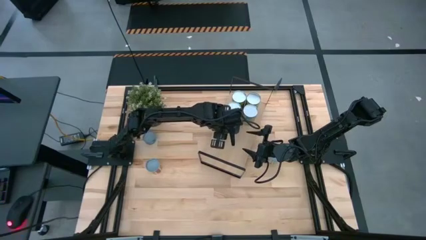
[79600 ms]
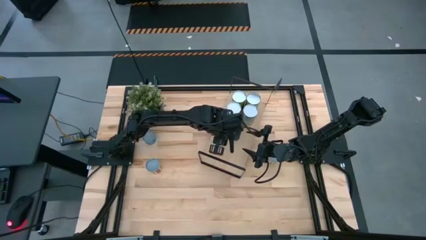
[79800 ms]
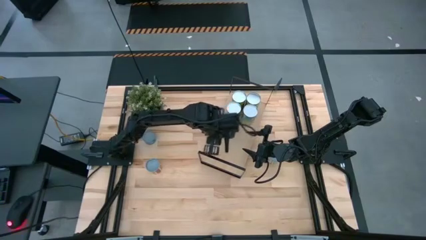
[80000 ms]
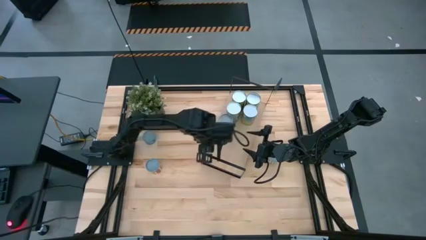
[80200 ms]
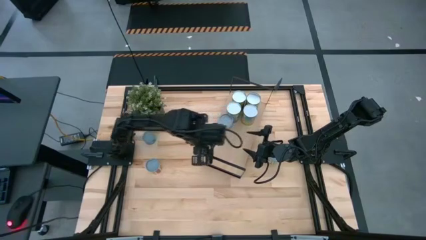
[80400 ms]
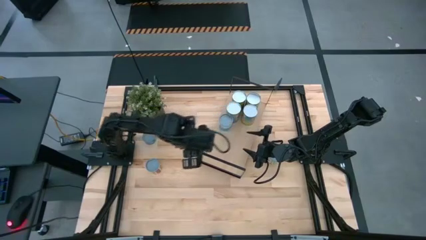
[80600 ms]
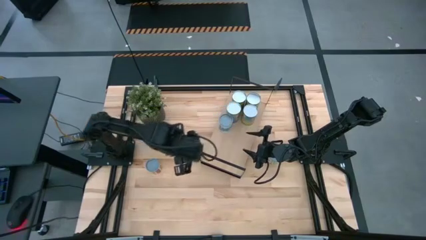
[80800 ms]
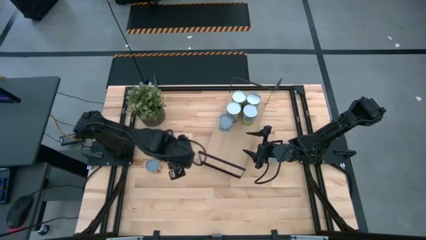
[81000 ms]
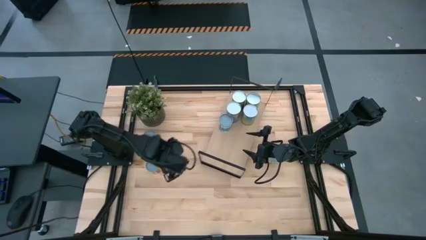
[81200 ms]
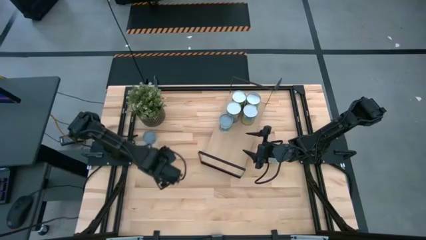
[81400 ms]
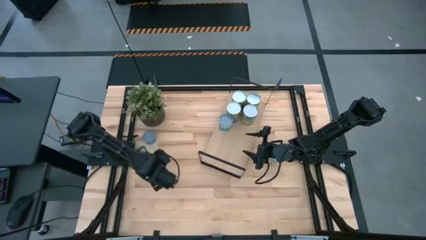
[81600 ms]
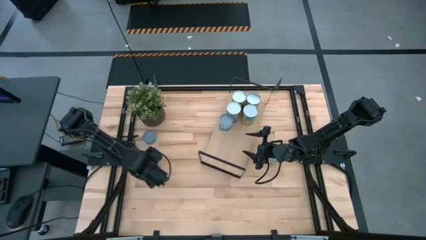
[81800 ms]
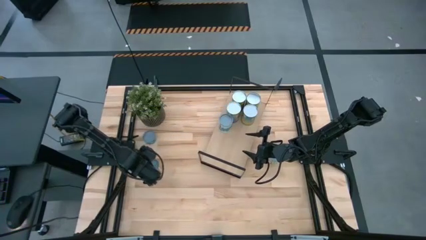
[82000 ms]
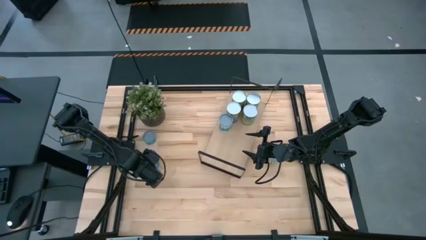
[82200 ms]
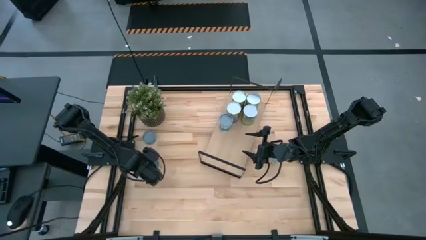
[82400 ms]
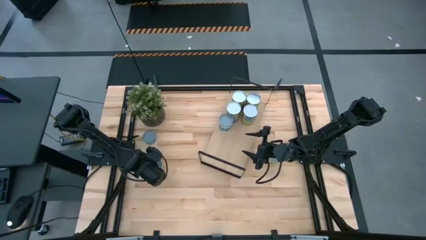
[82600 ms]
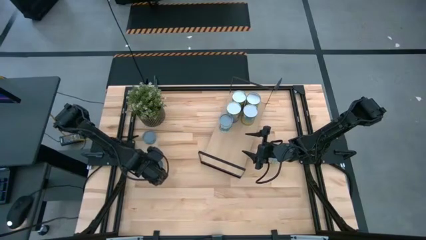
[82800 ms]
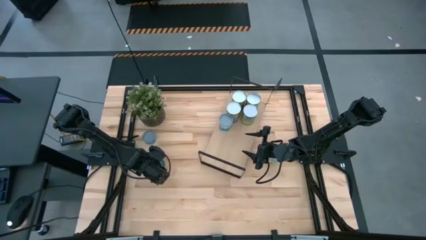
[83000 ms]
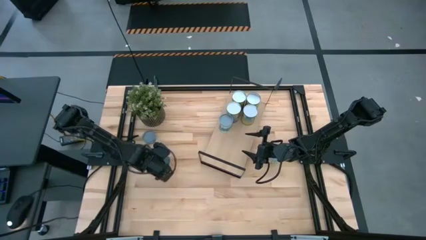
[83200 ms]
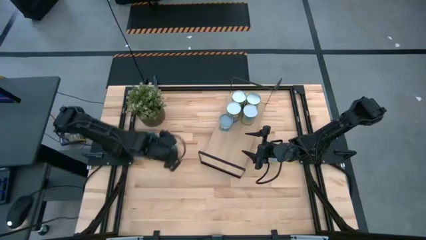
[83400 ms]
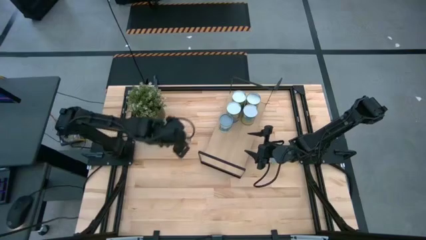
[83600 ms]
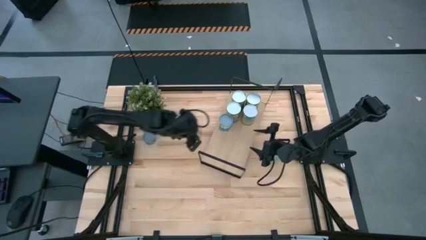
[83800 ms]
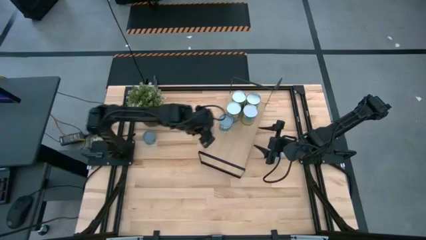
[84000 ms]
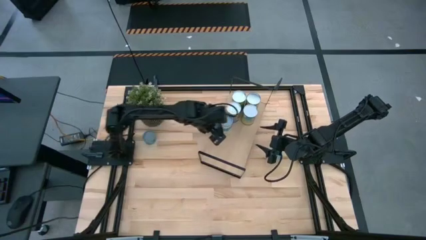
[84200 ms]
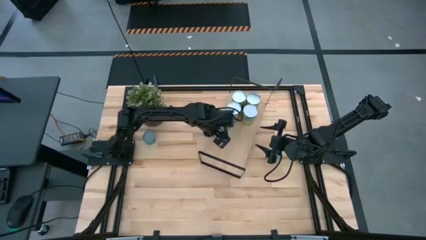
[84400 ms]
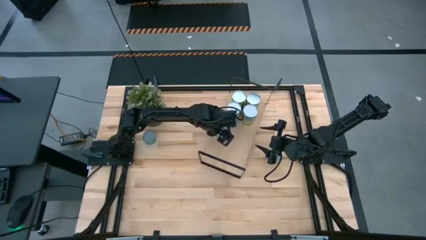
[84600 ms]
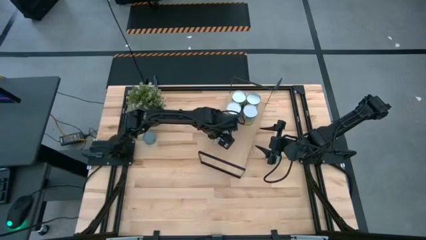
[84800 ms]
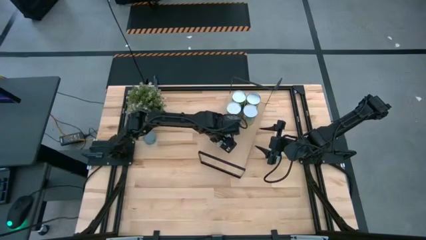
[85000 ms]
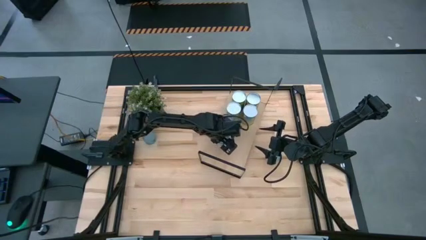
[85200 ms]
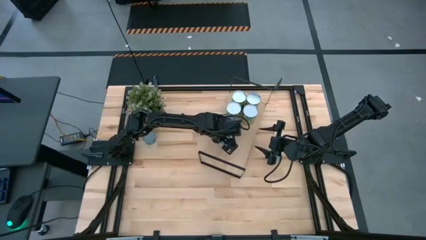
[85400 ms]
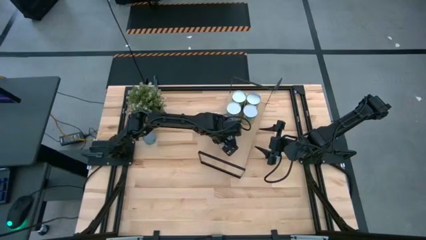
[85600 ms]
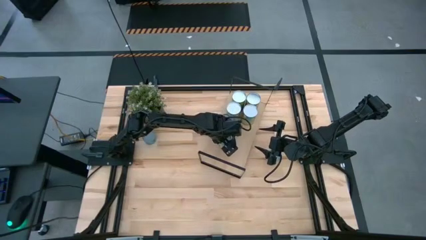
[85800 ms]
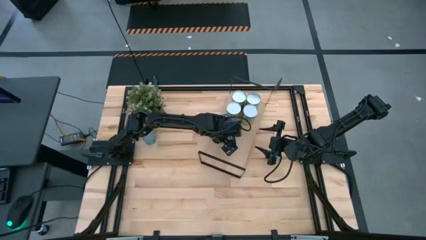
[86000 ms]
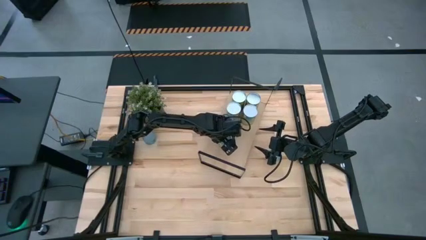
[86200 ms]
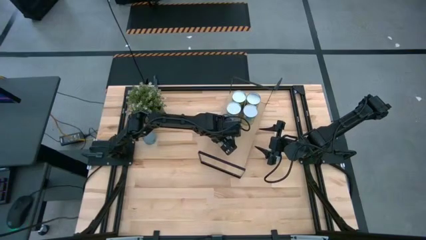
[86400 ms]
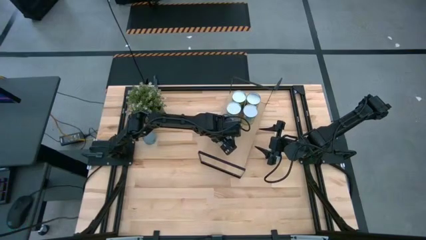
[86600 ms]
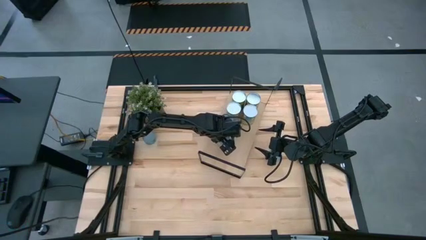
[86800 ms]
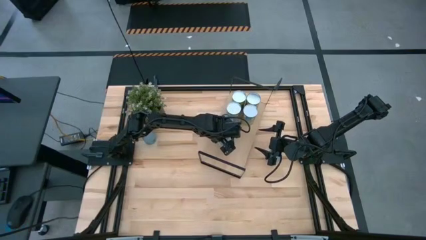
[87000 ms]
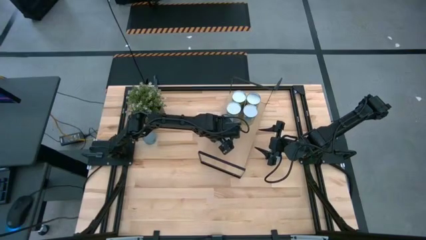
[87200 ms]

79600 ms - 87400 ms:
Task: Pick and place cans onto a shelf
Put the canned sliced tomatoes on the shelf

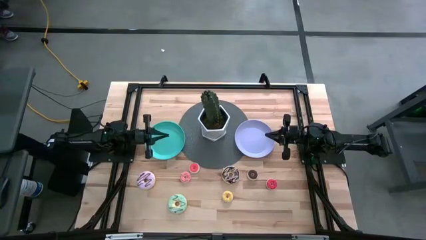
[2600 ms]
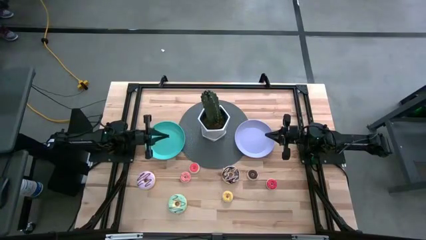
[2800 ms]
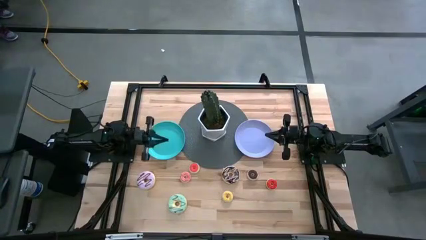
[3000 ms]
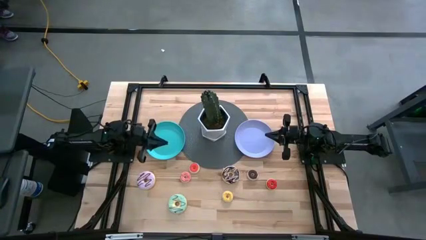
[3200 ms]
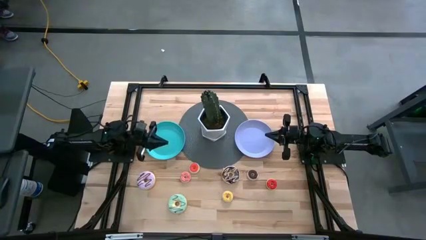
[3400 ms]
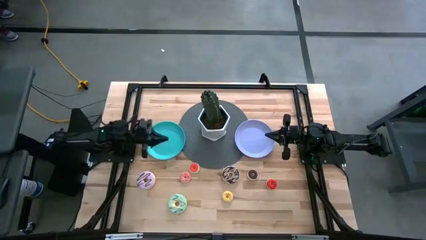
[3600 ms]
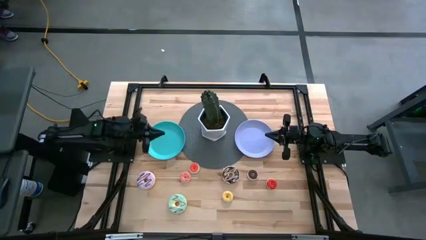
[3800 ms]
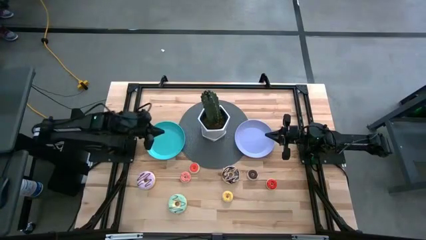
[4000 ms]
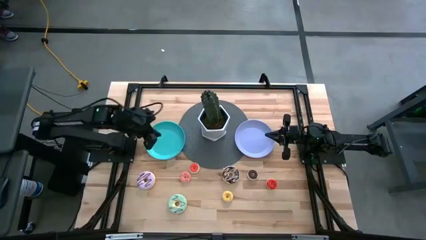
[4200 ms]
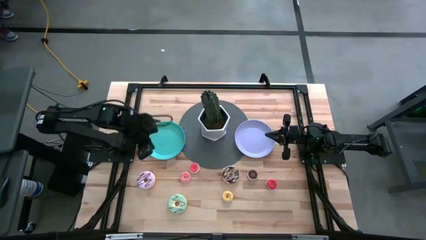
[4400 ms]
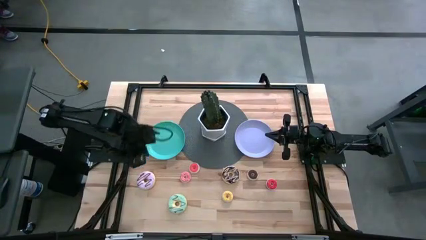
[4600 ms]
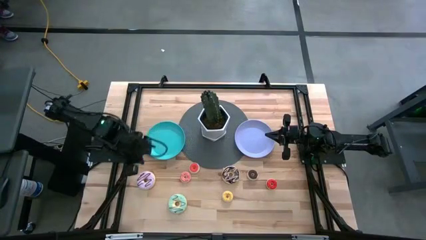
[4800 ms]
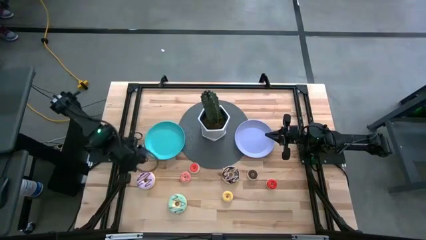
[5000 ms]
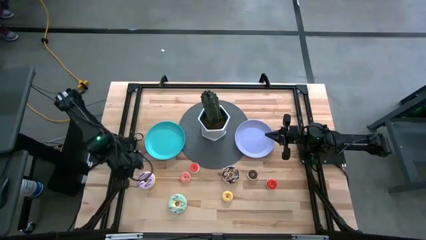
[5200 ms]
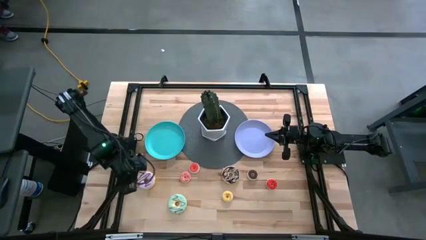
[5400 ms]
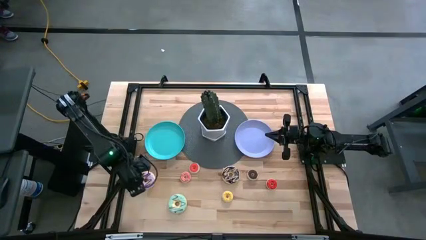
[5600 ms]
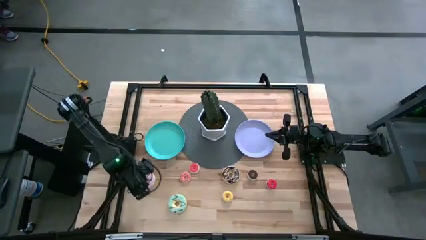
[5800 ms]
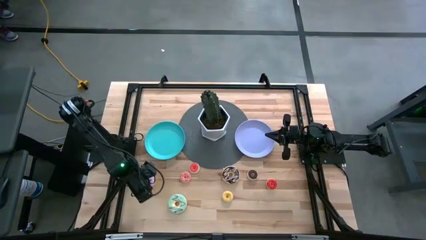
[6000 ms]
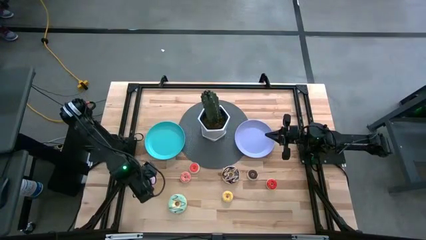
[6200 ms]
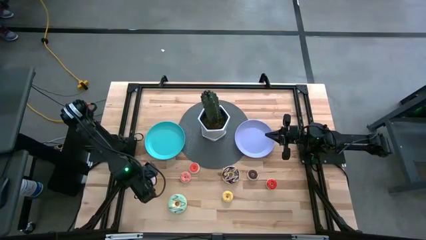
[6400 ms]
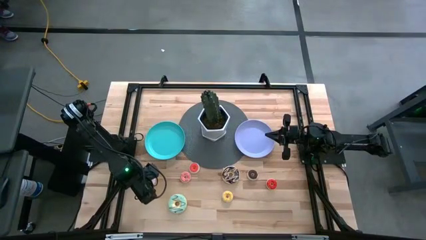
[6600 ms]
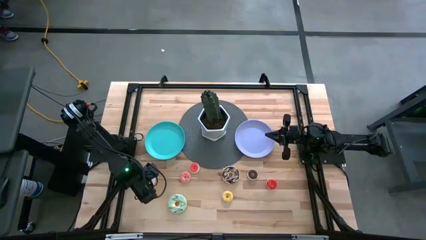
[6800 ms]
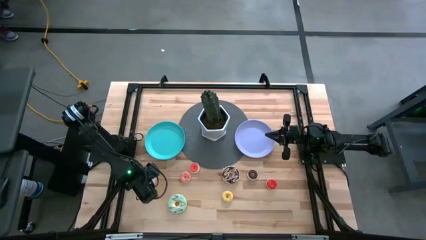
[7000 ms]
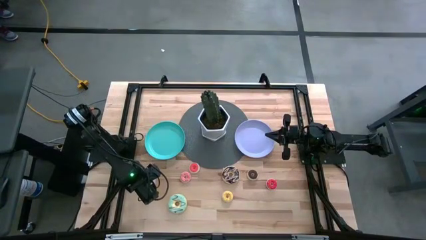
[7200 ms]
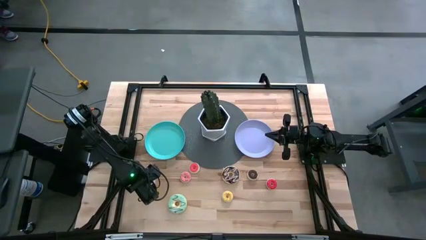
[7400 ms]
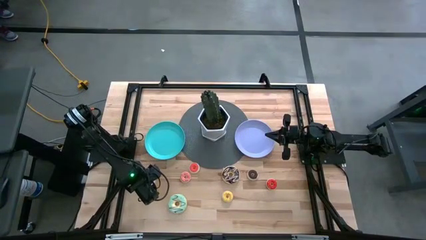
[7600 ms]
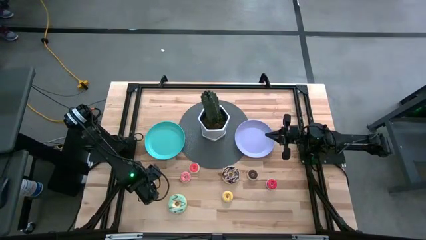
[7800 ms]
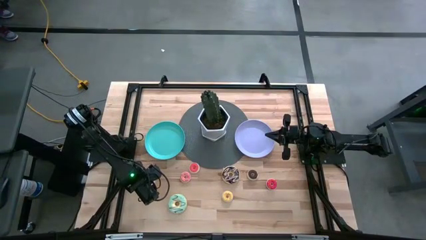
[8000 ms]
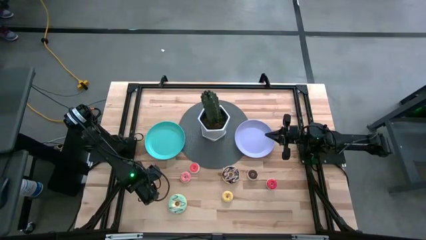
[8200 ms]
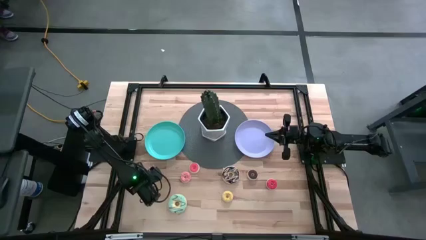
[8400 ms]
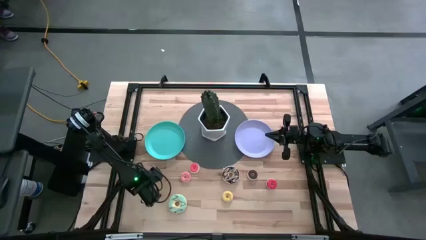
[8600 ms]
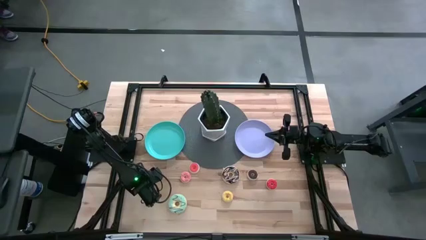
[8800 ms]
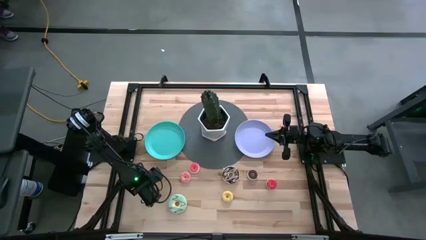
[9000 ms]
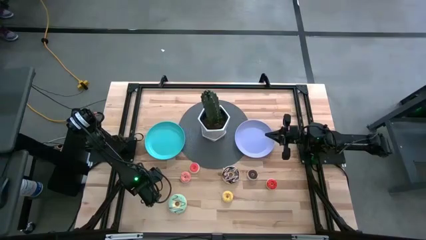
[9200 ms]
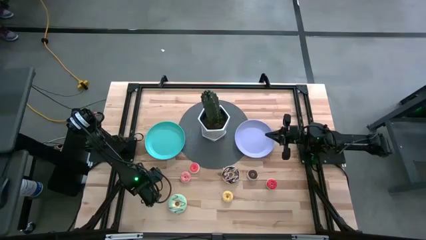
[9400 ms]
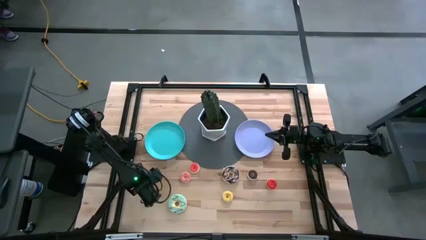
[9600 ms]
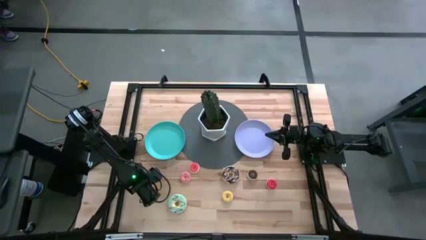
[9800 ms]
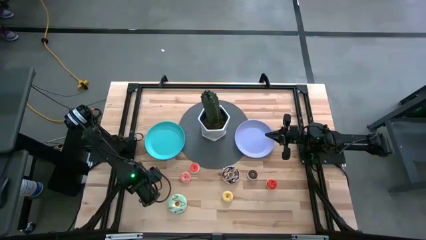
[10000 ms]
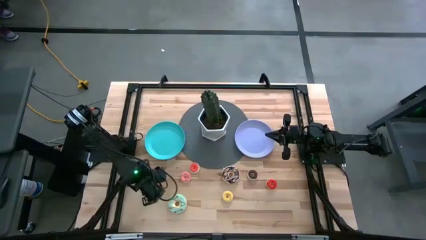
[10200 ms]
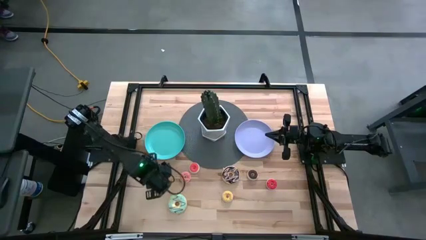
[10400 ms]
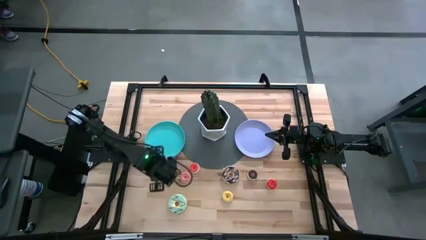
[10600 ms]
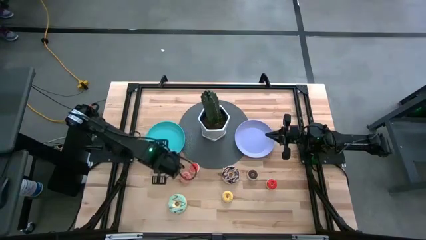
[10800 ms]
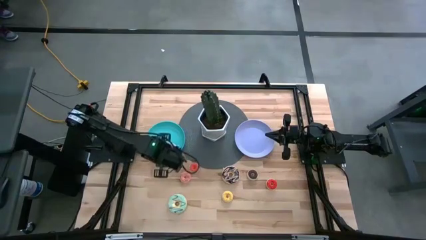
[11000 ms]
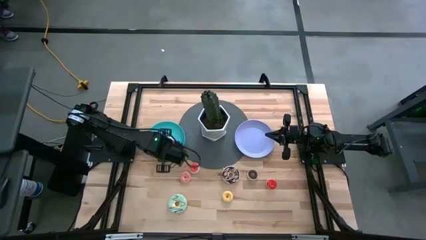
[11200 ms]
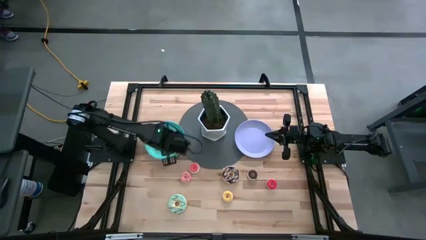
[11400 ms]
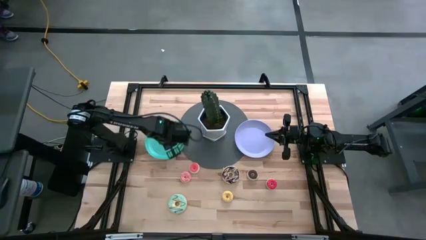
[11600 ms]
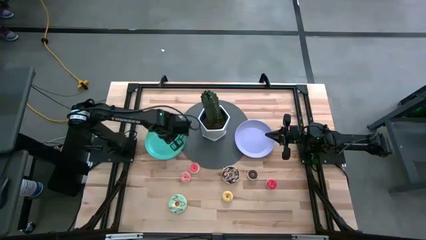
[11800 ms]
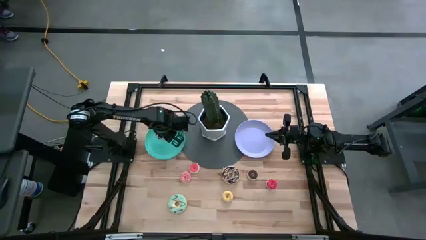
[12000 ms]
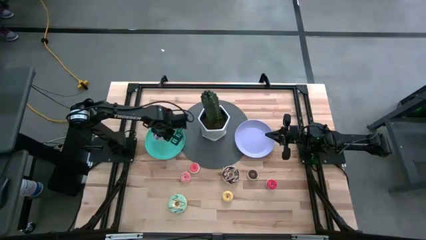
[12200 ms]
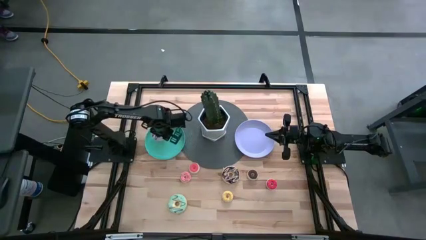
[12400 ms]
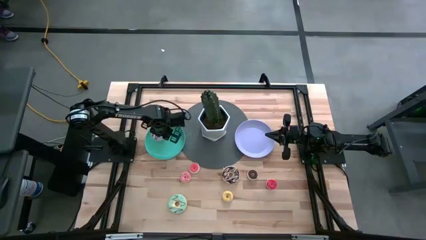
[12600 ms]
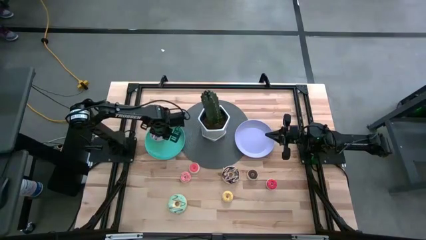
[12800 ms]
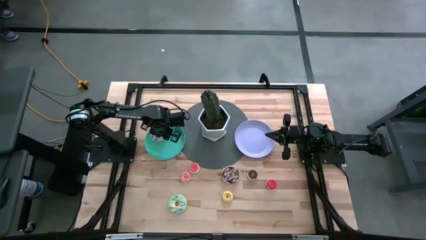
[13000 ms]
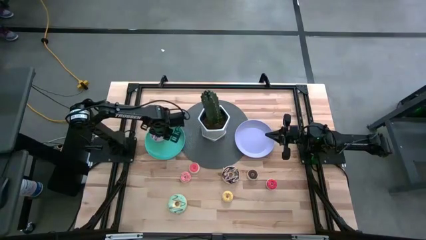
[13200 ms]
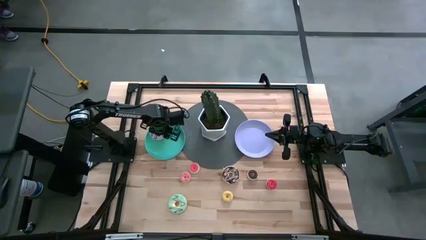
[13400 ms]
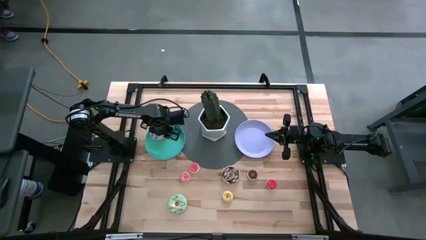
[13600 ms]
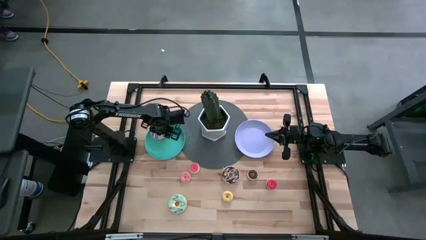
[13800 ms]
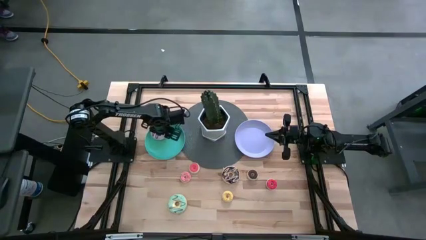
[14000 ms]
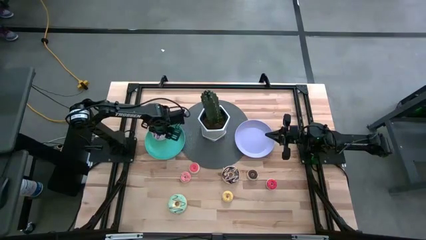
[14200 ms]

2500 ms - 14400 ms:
Task: Pick & Place donuts
Put the big purple donut on the green plate
